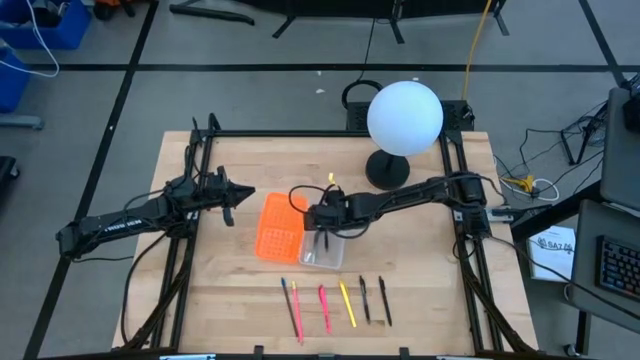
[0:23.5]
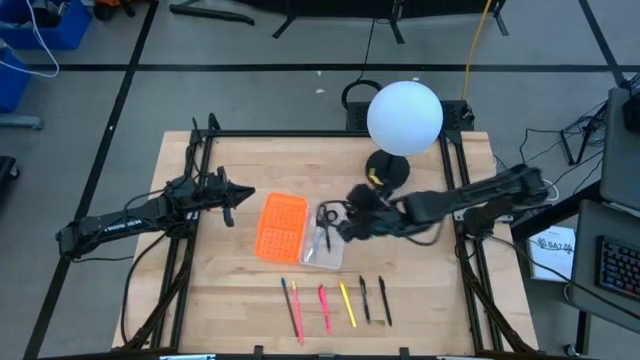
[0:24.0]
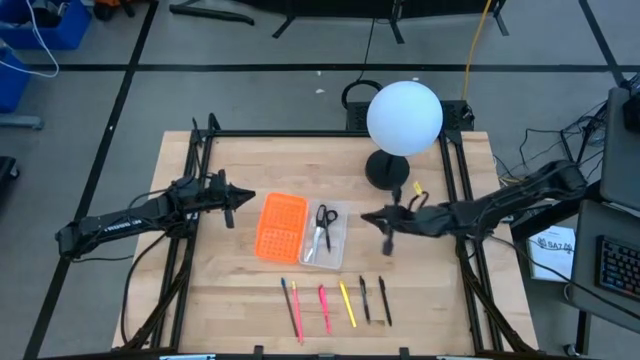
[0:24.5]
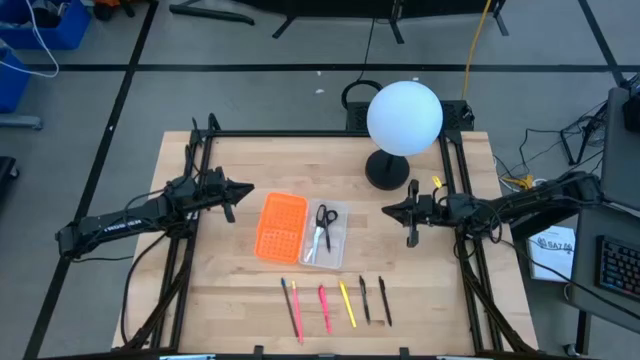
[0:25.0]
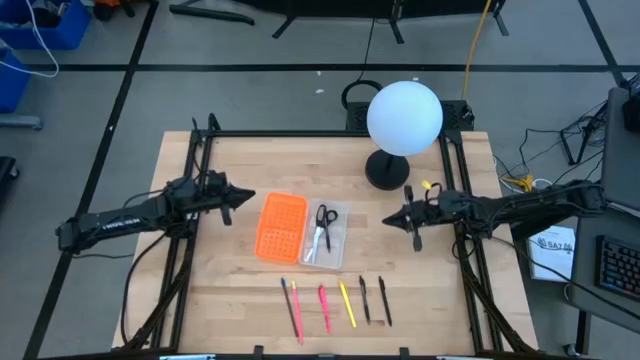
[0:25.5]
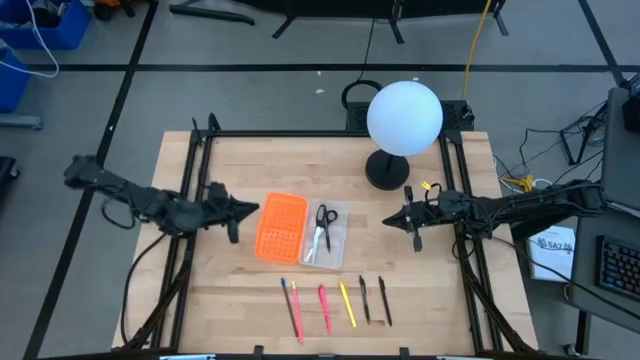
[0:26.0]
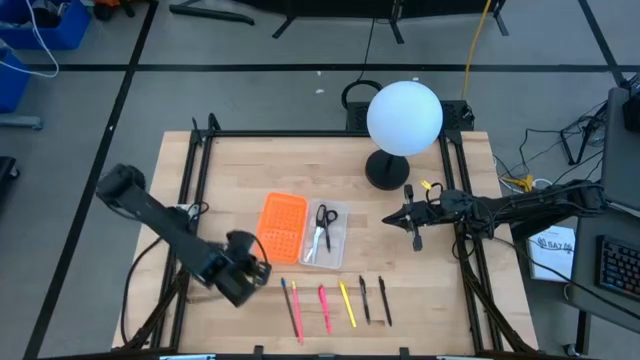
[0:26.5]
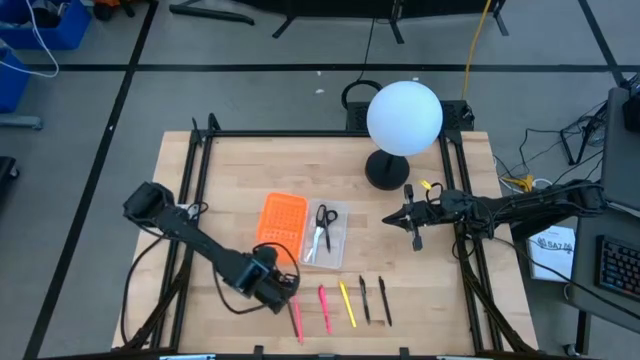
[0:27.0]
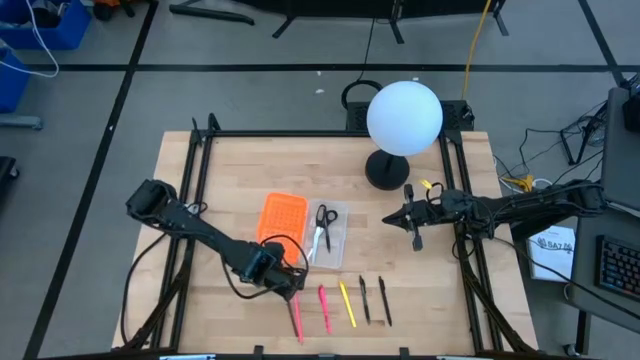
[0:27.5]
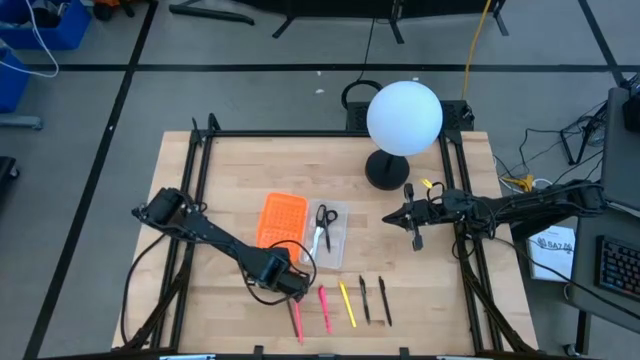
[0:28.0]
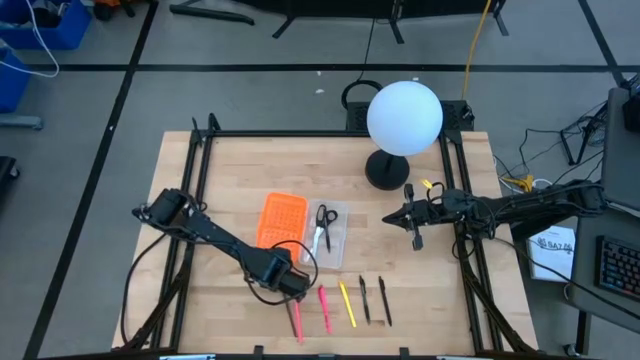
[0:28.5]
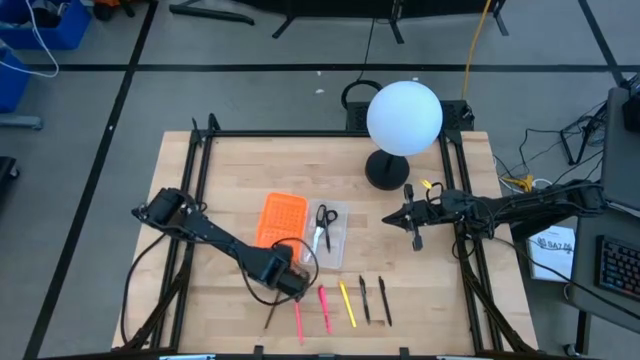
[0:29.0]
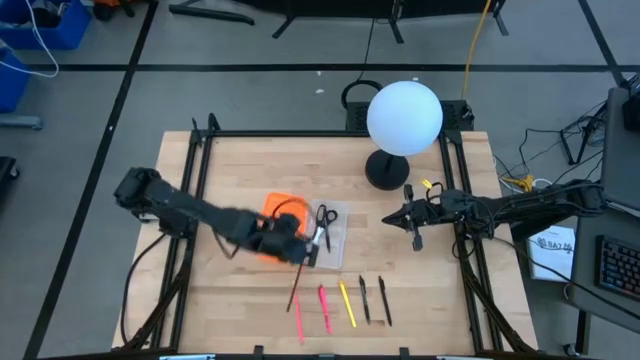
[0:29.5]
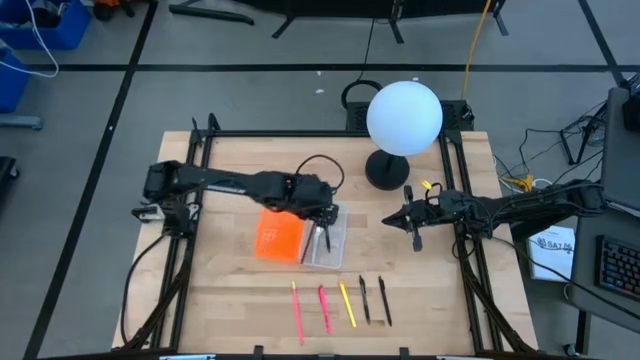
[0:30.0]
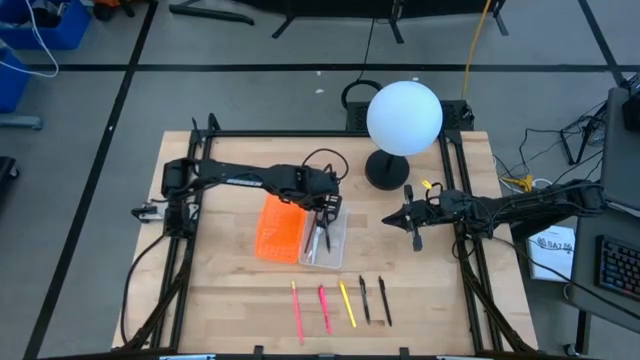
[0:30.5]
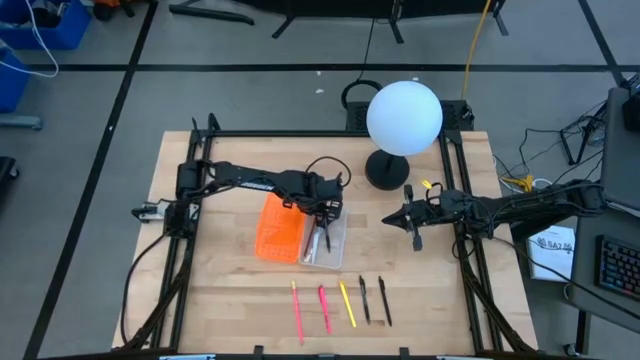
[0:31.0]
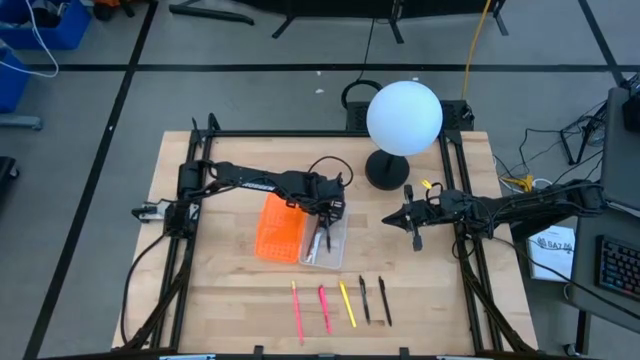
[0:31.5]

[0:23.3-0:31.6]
Task: Pick & place school supplies into a supply box
Put the brown pencil into the orange supply box

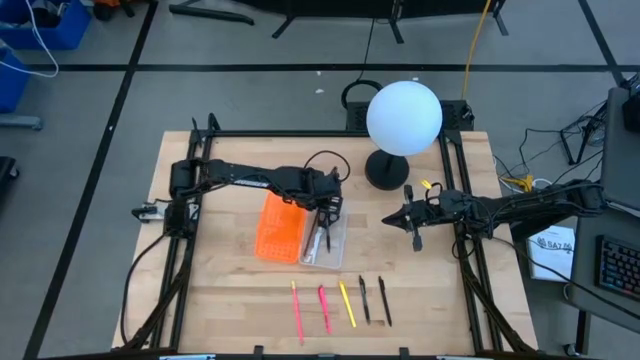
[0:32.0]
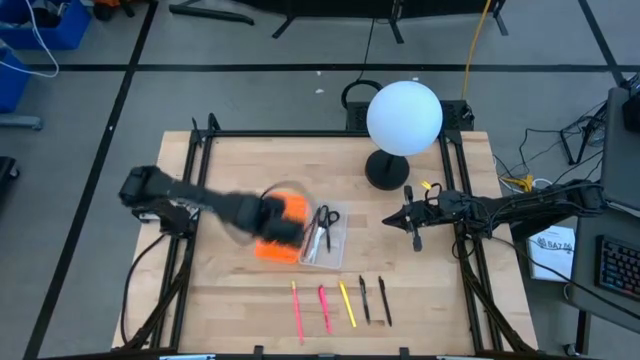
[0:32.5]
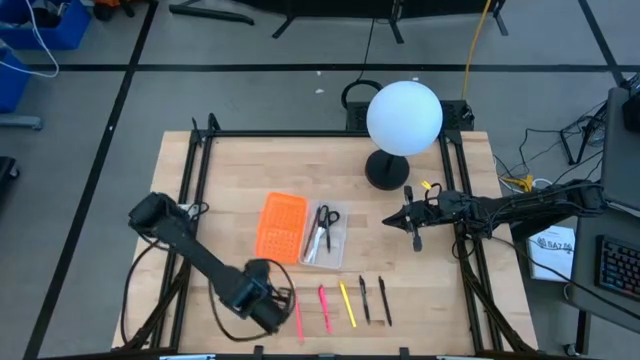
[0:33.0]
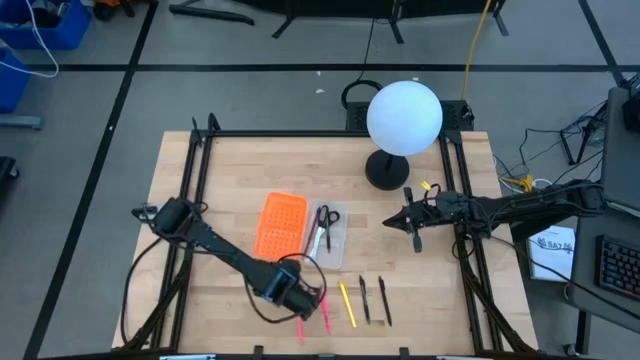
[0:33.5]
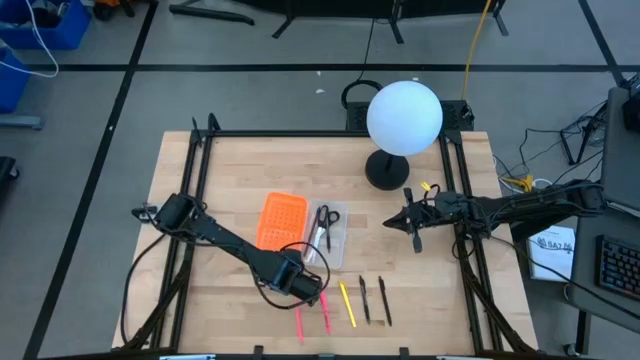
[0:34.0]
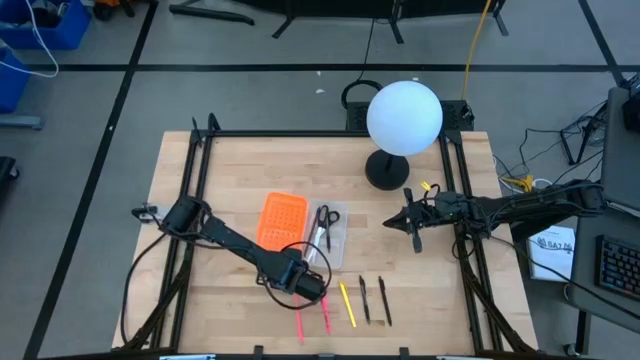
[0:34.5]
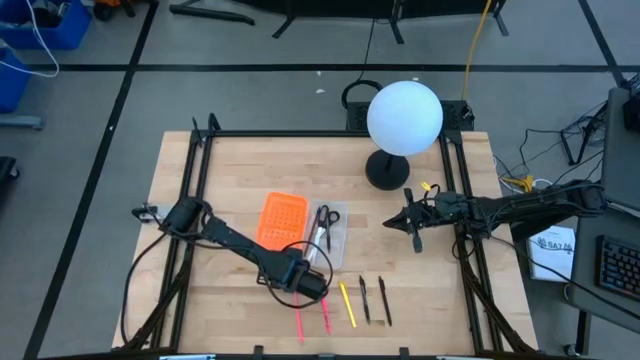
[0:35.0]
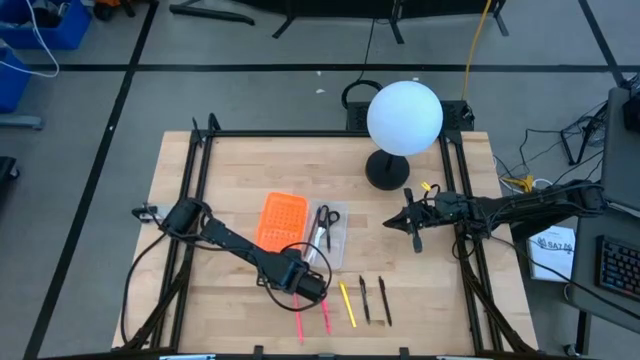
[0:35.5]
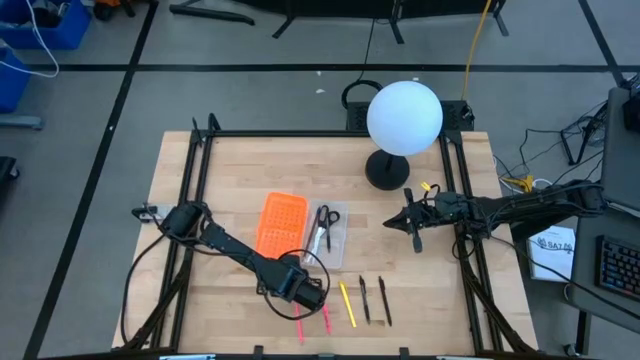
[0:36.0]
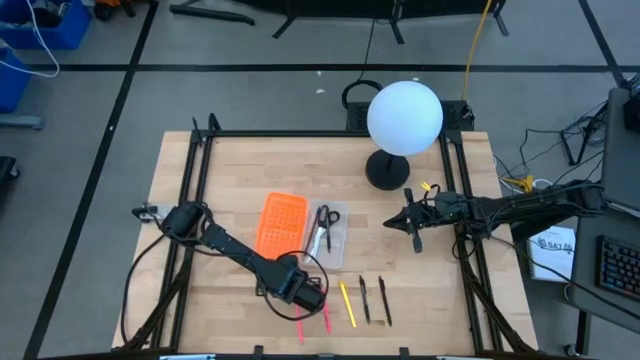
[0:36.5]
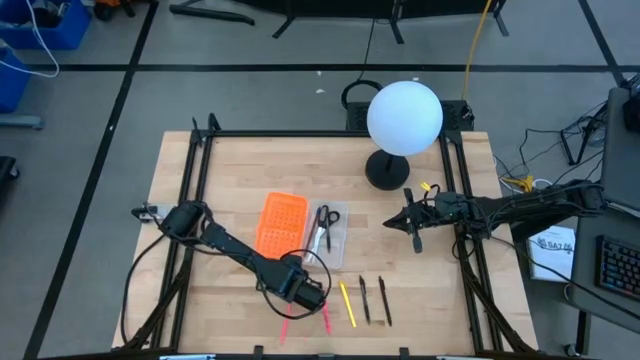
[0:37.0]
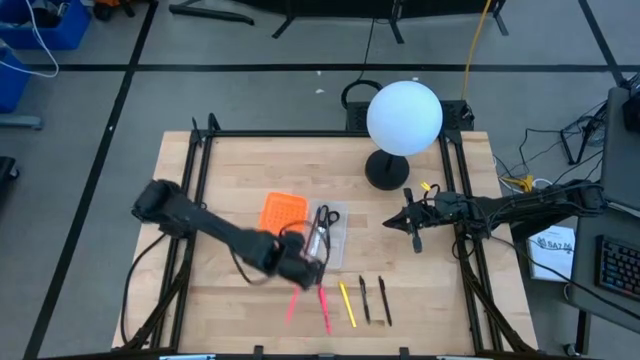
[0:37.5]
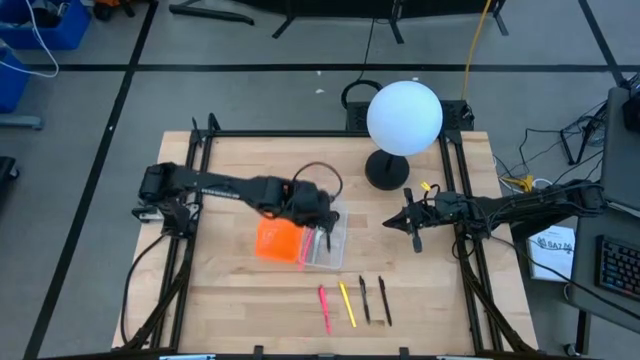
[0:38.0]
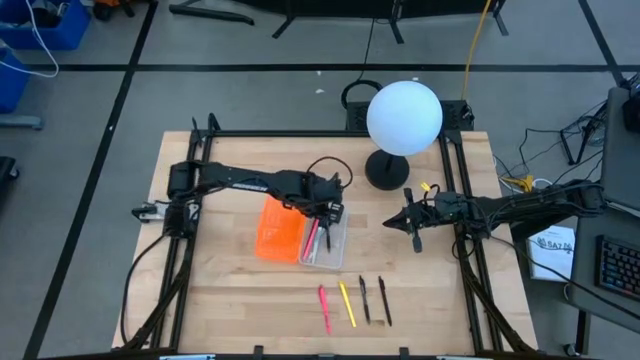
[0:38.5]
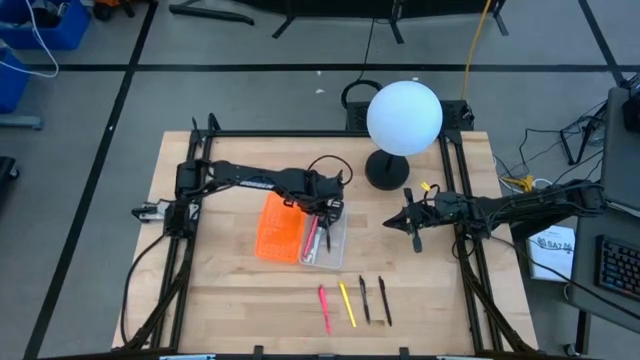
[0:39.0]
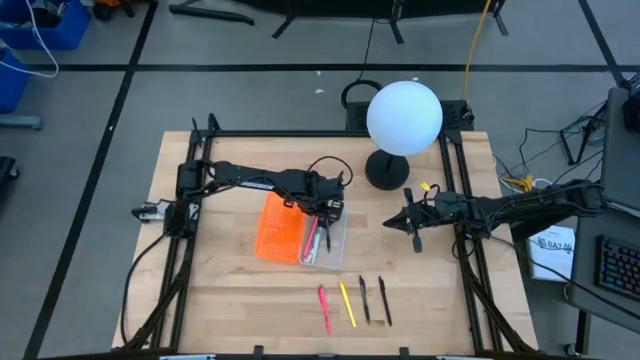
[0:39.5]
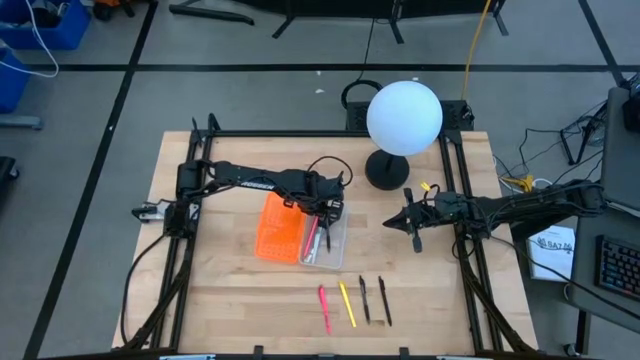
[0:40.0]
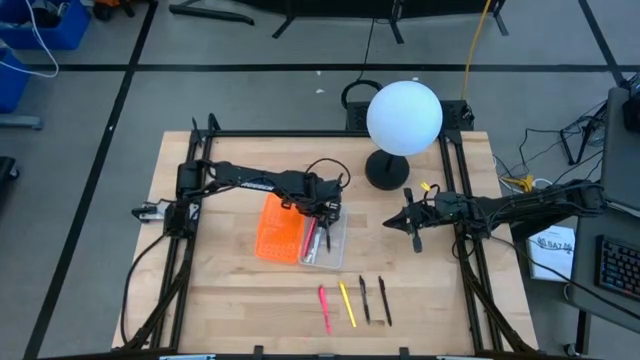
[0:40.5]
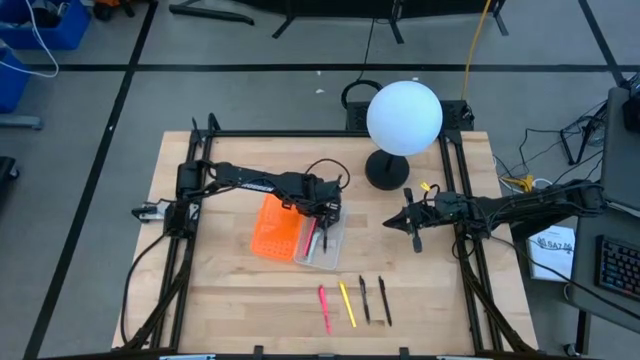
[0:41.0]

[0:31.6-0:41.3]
Put the pink pencil into the orange supply box

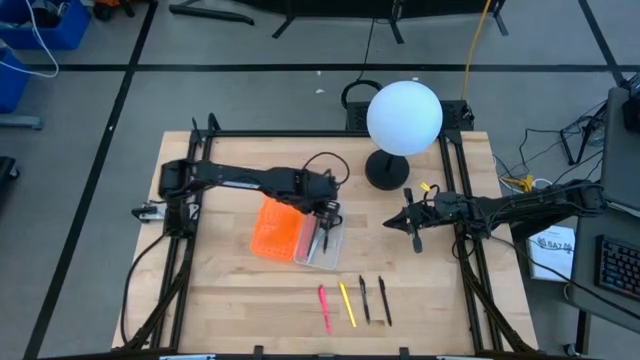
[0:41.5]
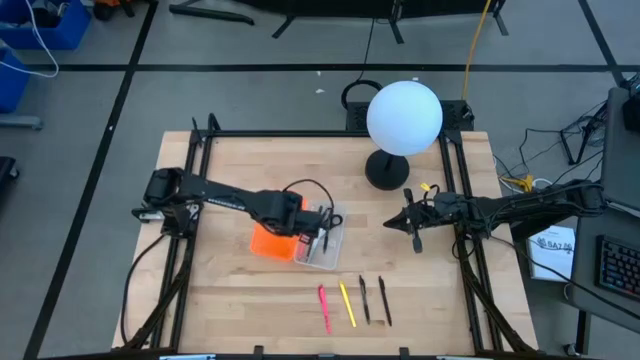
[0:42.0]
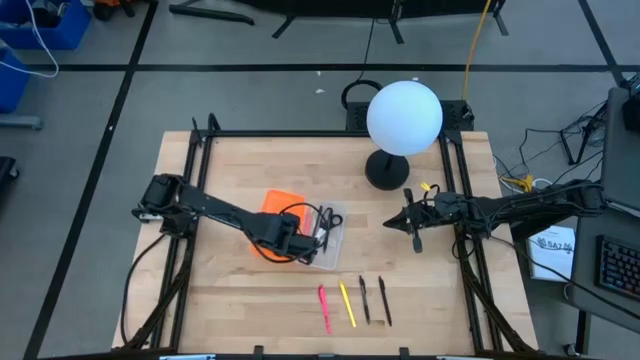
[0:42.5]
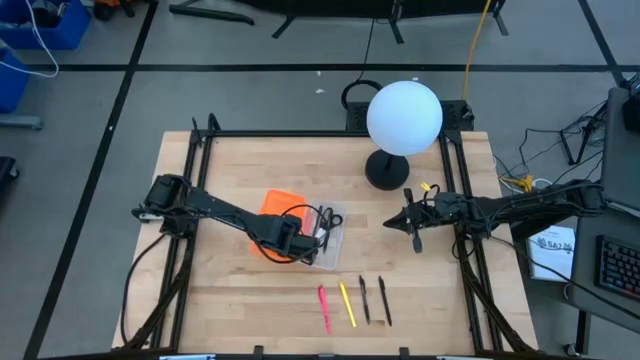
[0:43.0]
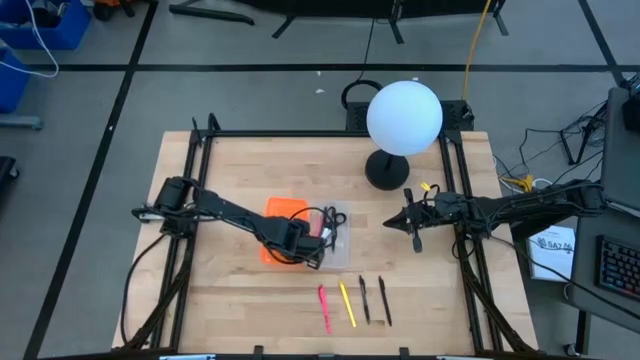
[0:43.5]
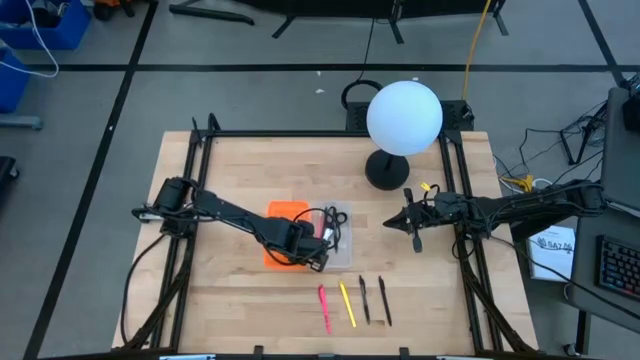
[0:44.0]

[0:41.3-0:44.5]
Adjust the orange supply box

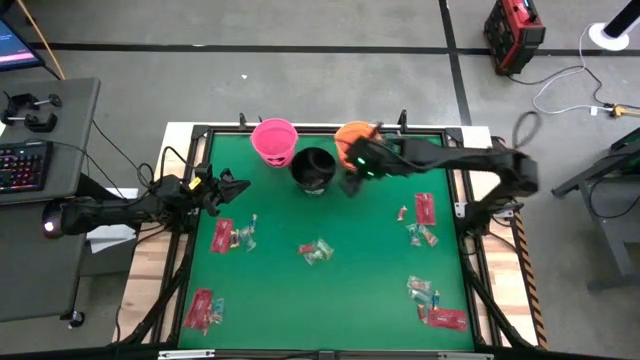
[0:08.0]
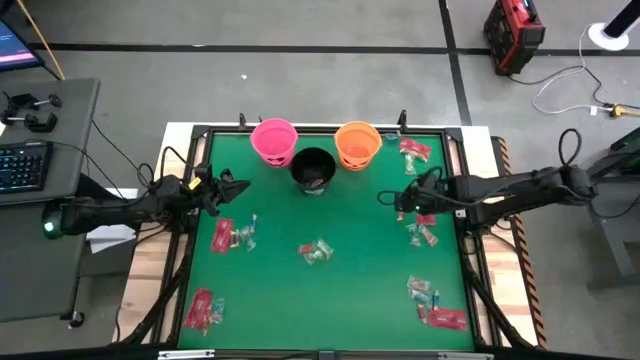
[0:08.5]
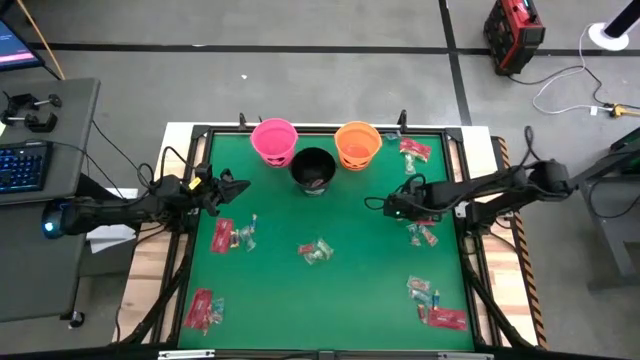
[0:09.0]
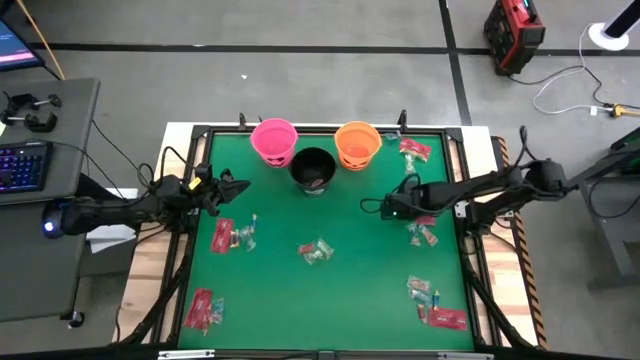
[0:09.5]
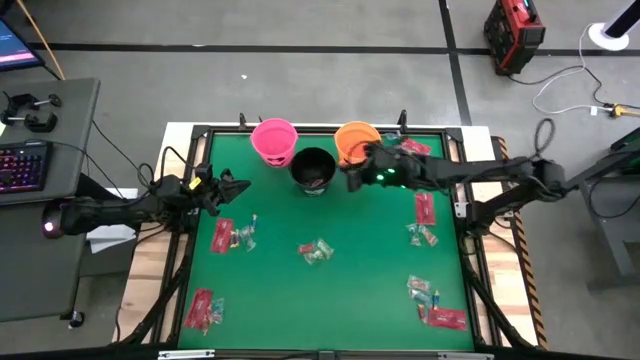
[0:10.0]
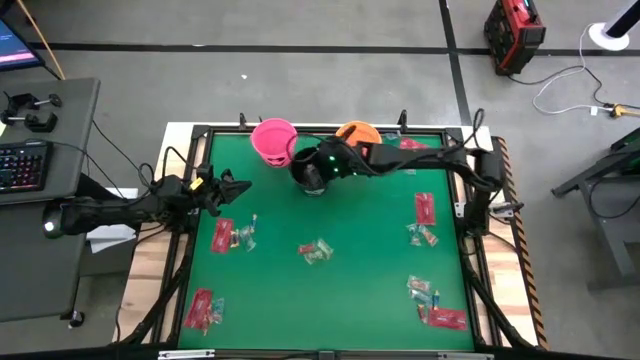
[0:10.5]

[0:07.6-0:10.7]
Task: Sort candy by brand, put in halloween buckets
Put the orange candy into the black bucket
